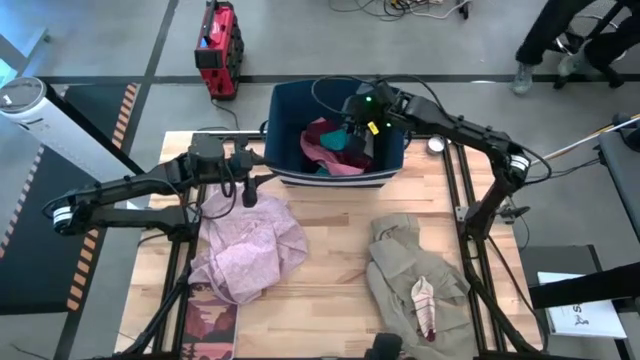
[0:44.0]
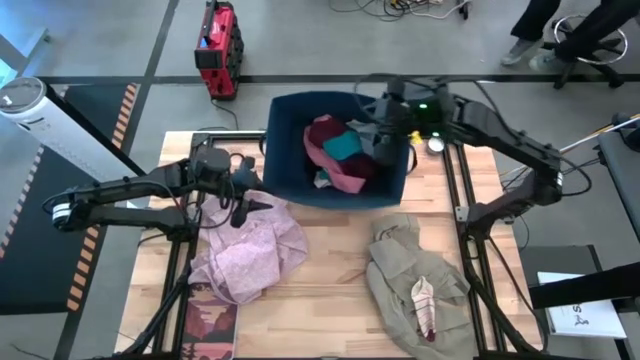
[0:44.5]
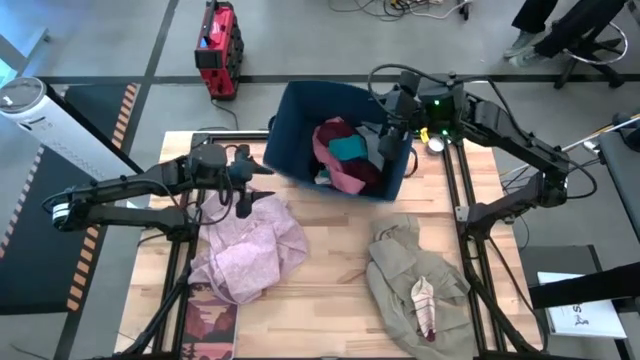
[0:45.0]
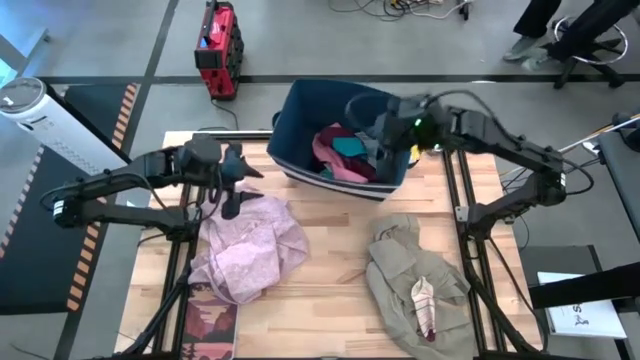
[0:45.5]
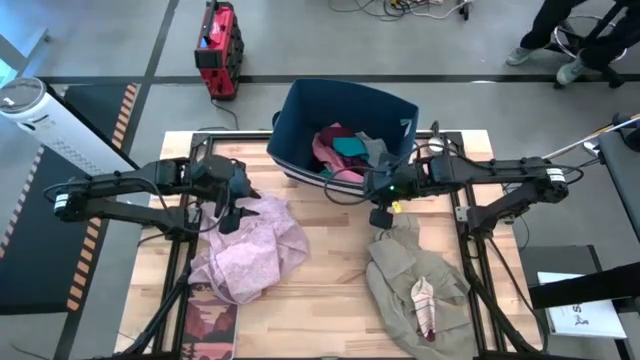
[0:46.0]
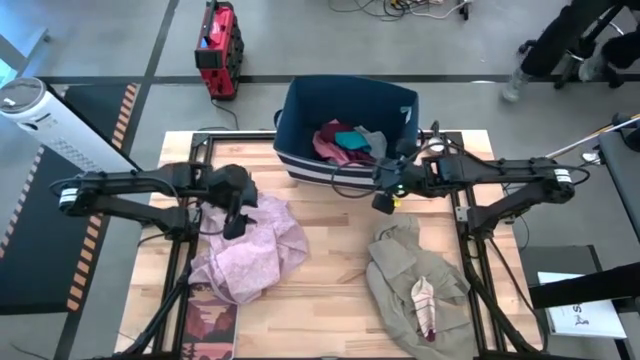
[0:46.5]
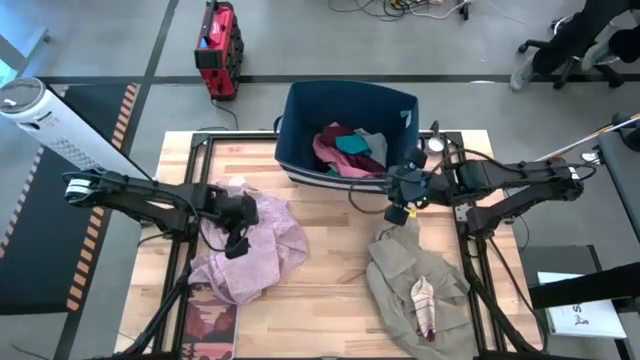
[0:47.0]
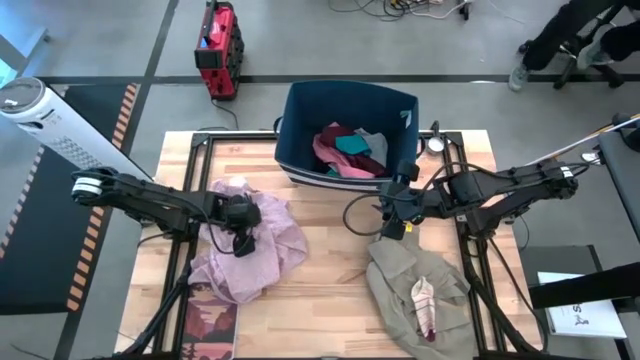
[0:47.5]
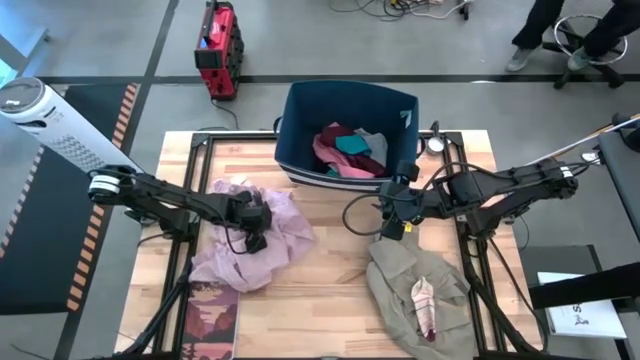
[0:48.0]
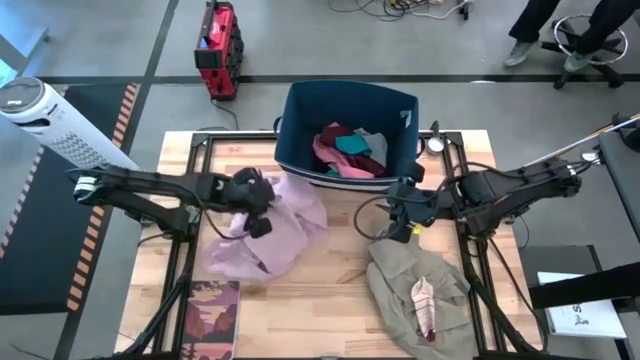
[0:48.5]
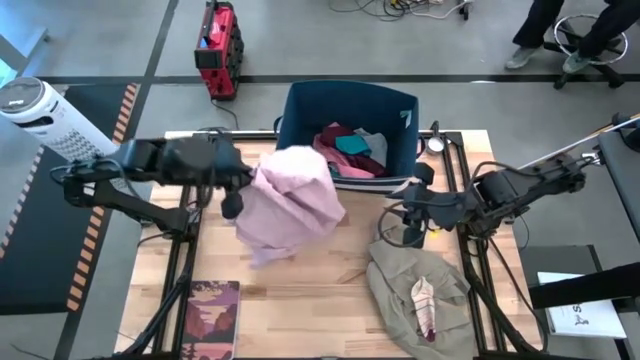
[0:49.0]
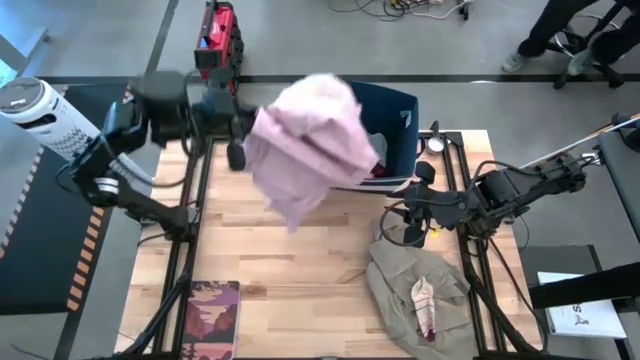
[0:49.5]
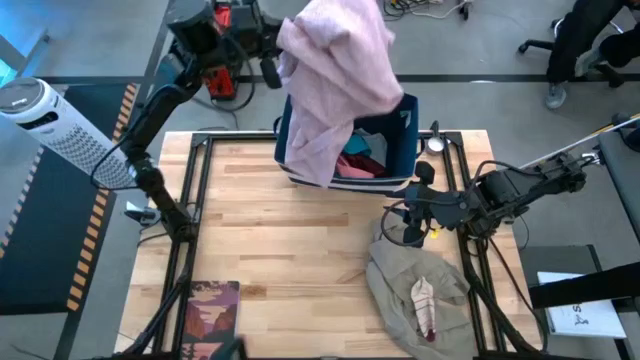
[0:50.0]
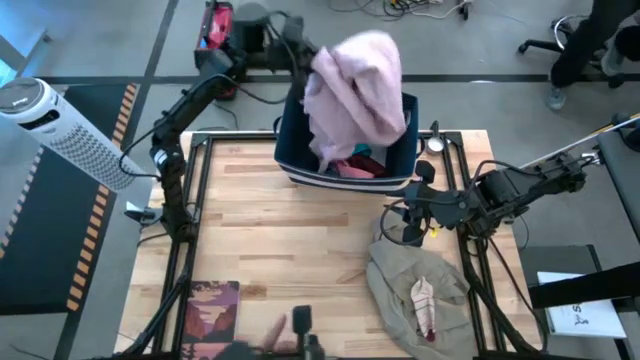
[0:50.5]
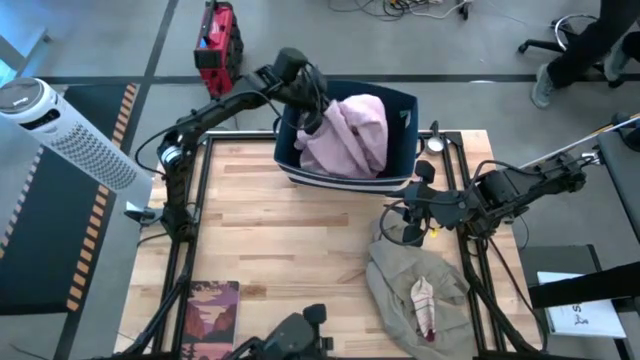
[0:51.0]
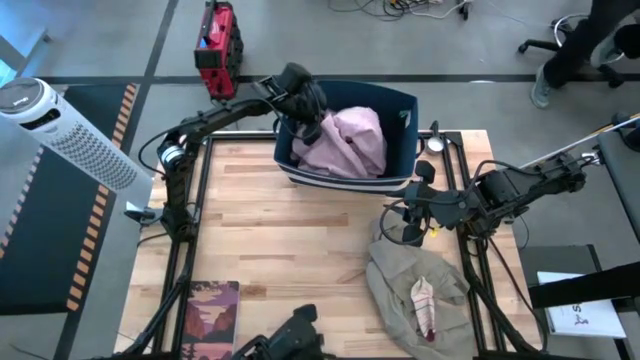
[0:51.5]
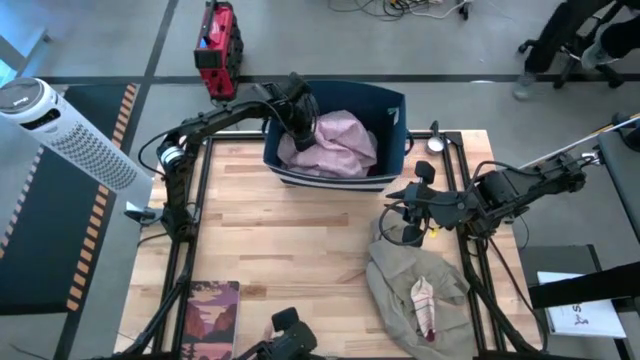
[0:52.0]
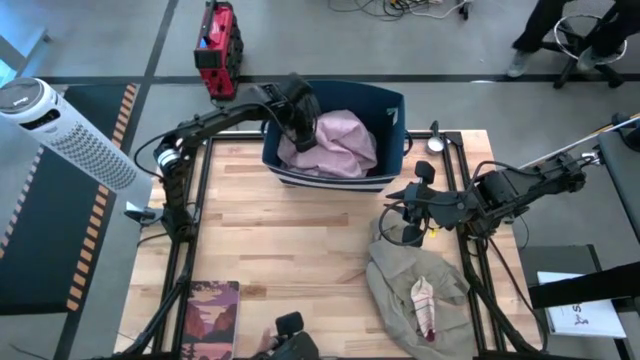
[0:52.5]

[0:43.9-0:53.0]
Task: Sort clothes
Put the pink dress into the blue laundry organizer

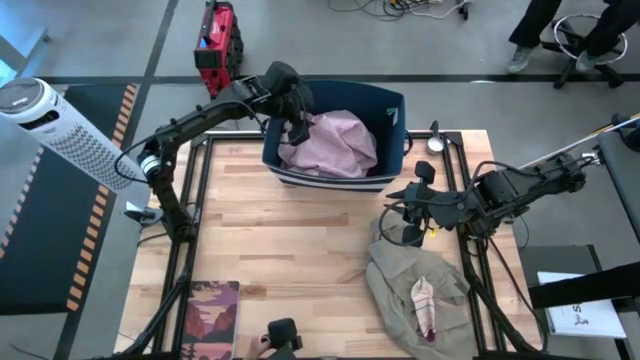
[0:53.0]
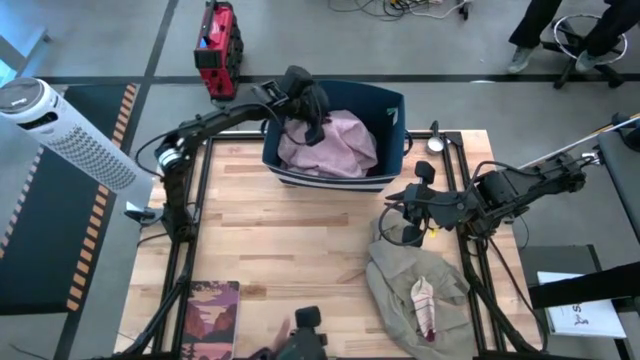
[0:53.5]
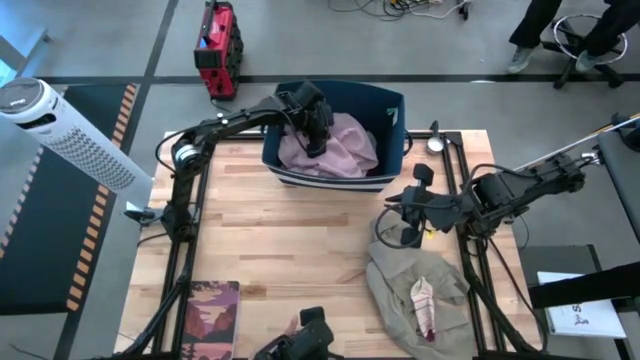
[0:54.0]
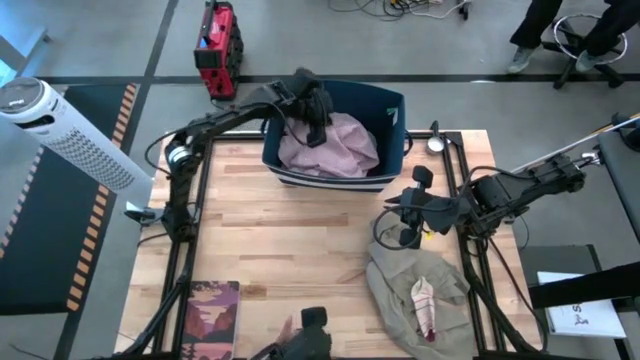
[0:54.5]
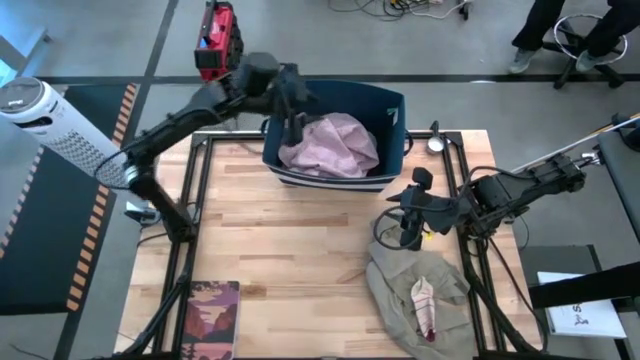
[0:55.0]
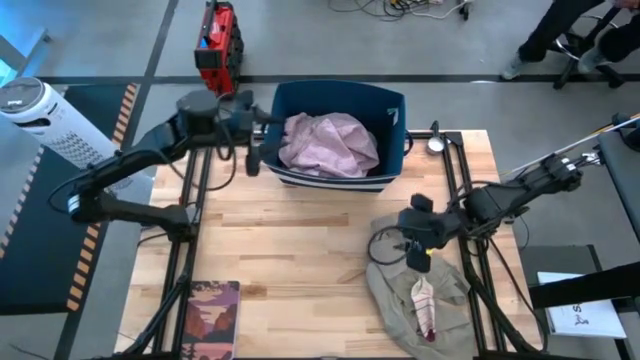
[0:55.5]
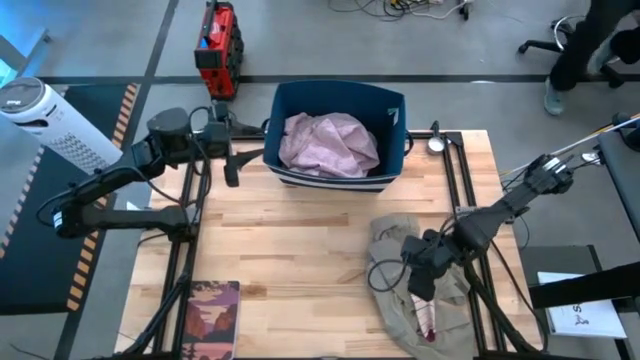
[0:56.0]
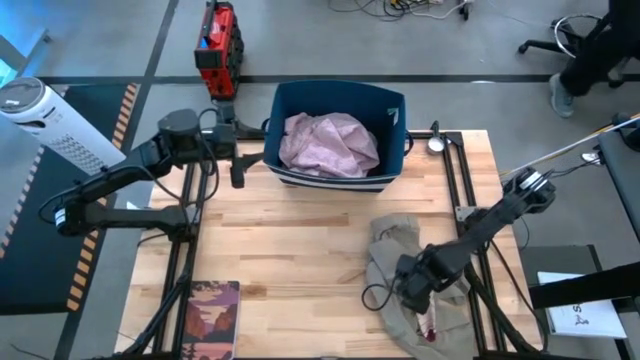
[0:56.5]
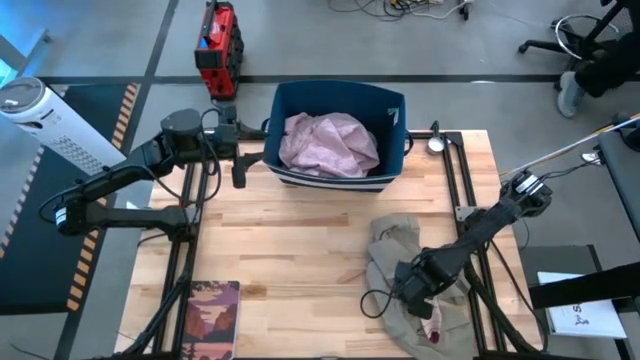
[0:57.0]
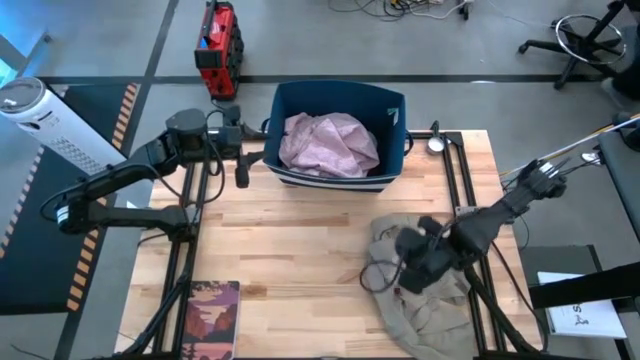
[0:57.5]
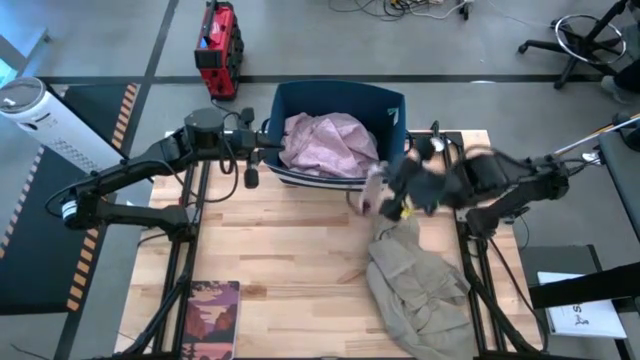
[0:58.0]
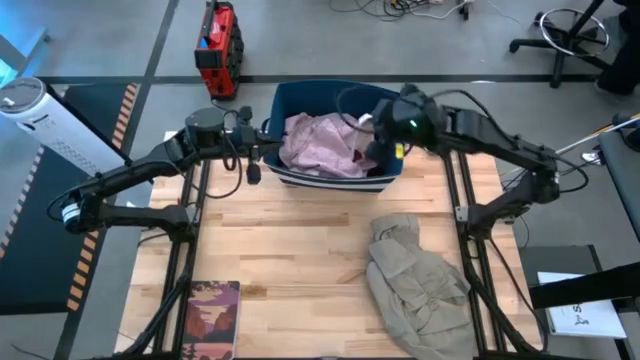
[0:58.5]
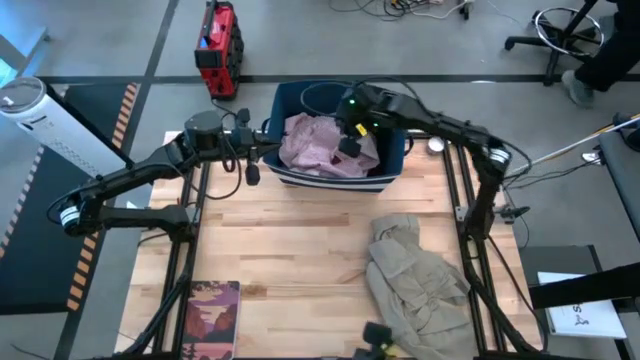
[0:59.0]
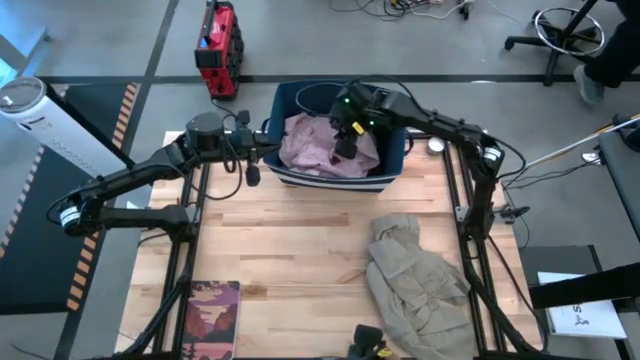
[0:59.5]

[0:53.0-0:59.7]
Put the white sock into the blue laundry organizer

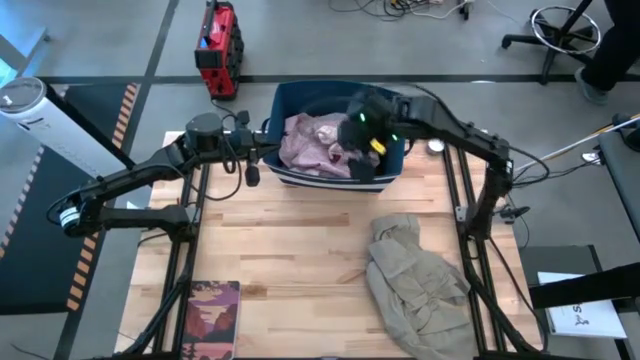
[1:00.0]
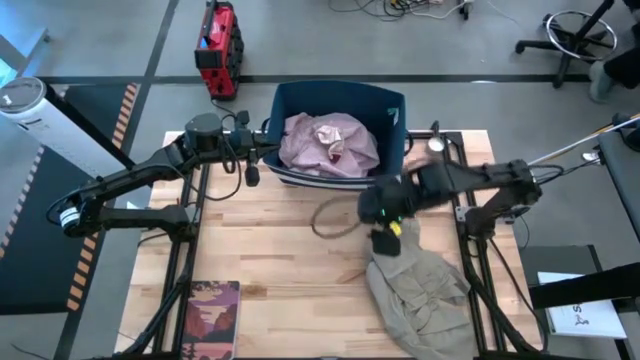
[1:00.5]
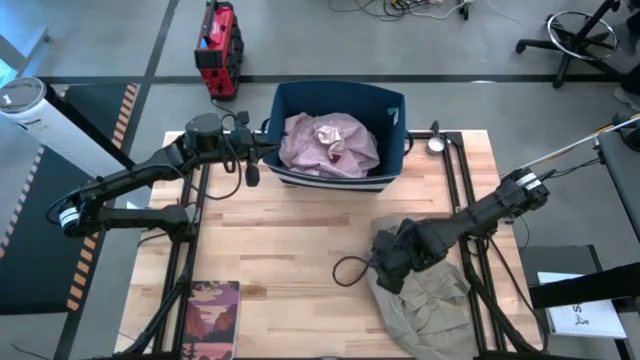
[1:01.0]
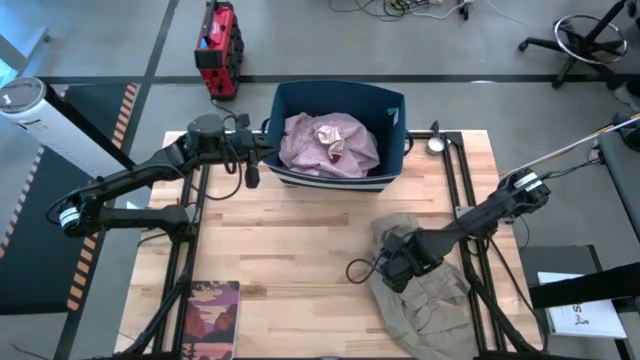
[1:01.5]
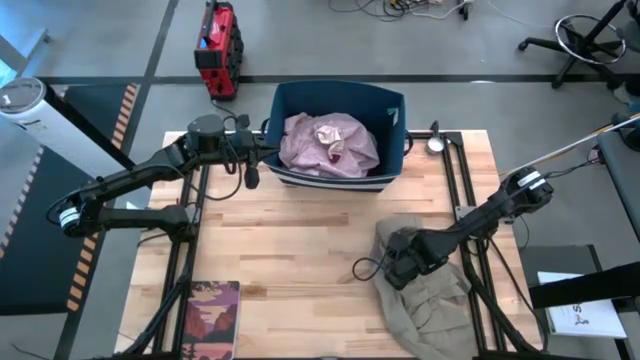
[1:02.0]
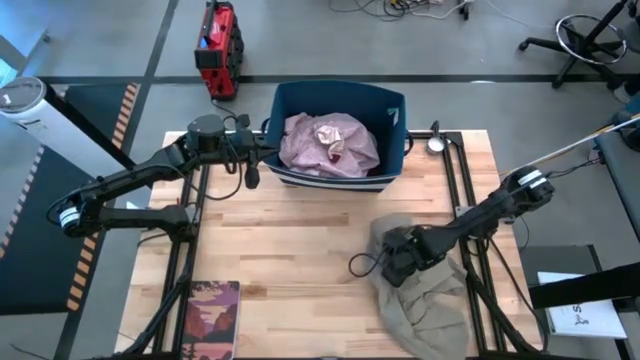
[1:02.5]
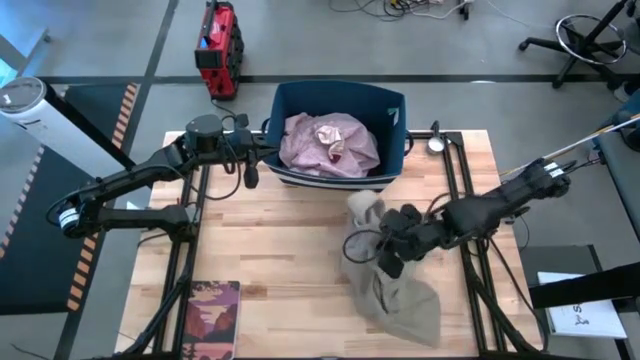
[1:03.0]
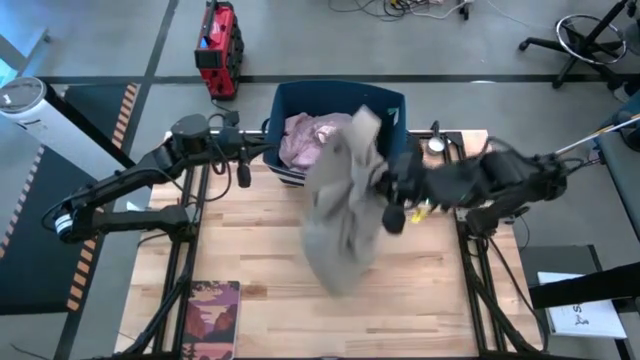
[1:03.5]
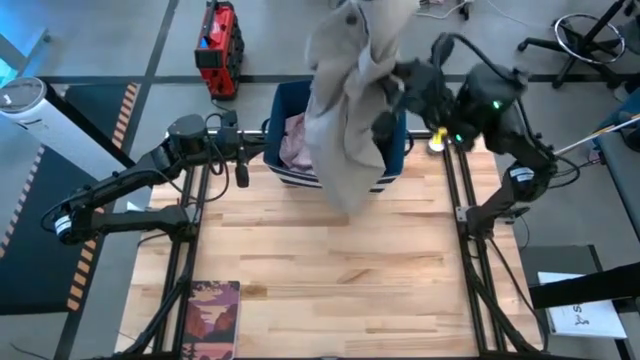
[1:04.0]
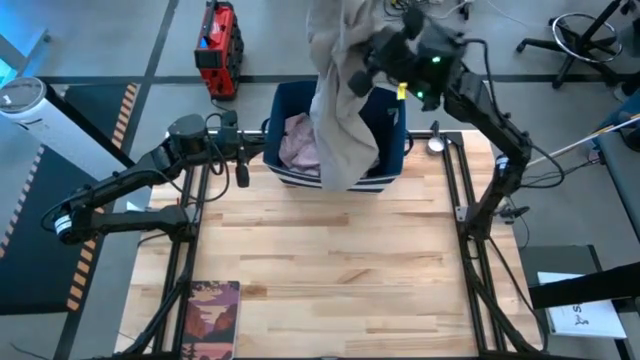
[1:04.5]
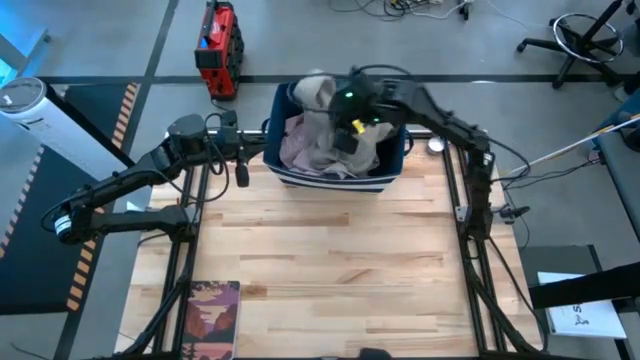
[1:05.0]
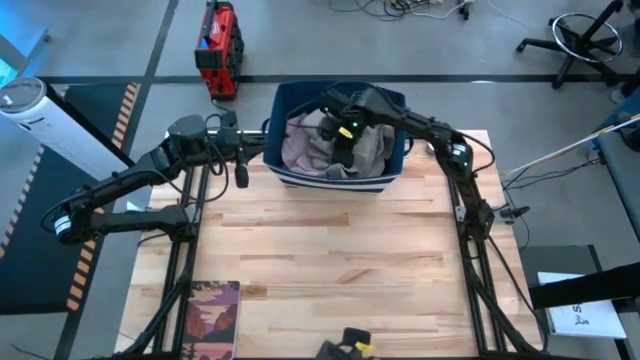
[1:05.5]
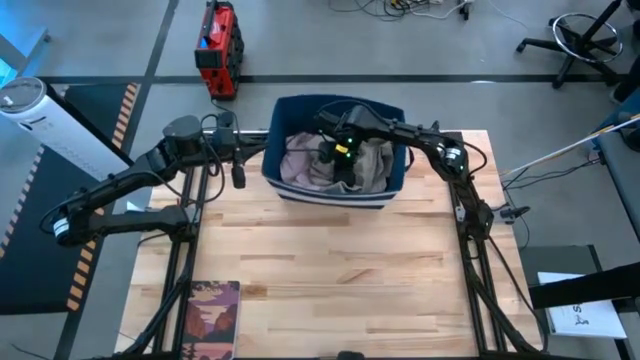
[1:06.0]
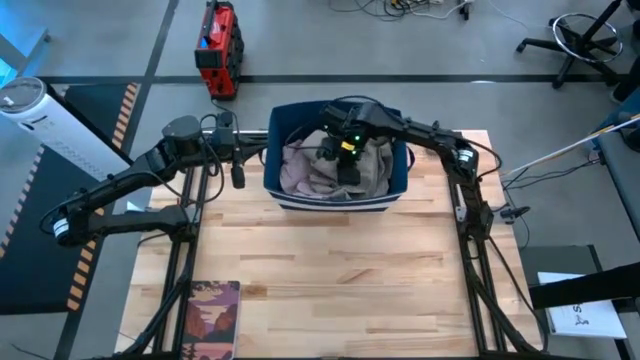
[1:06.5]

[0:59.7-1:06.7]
Put the light brown jacket into the blue laundry organizer
